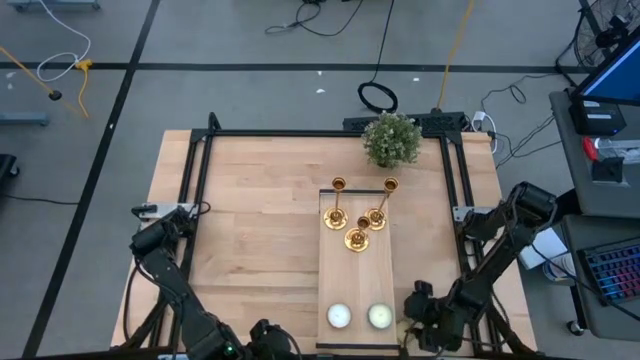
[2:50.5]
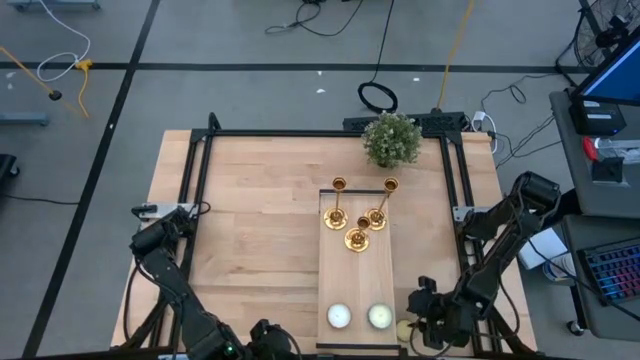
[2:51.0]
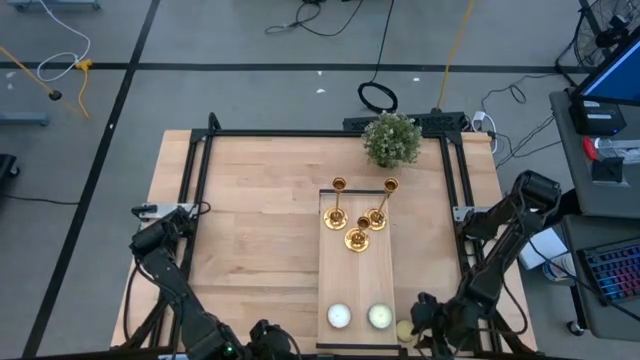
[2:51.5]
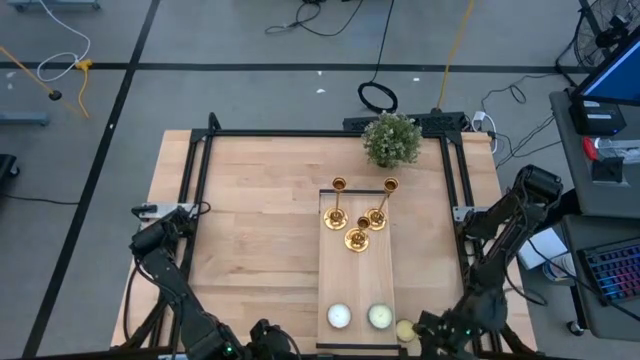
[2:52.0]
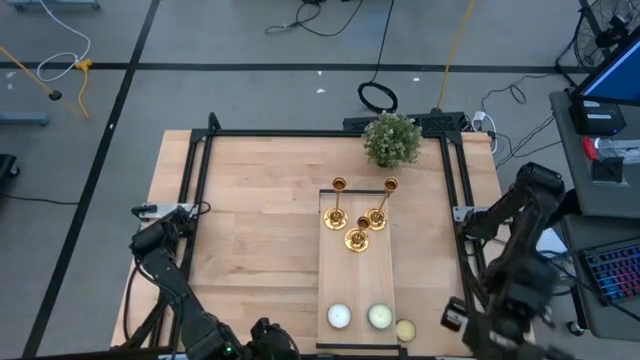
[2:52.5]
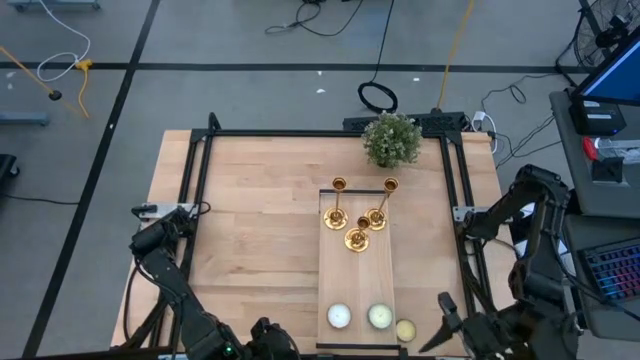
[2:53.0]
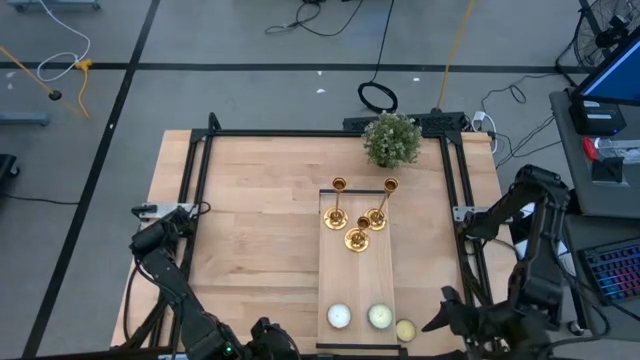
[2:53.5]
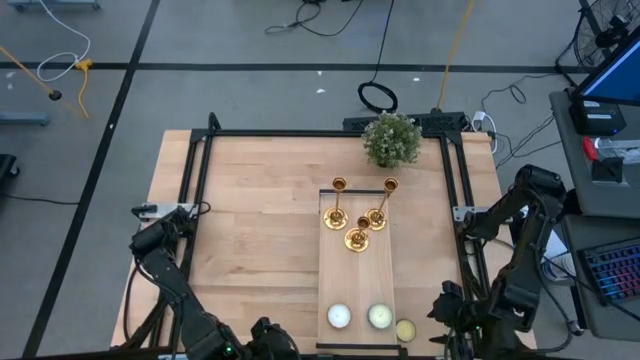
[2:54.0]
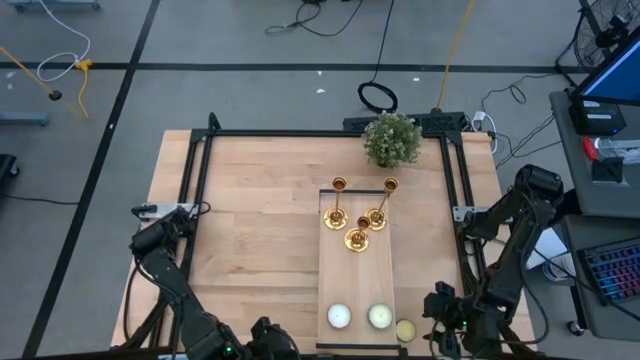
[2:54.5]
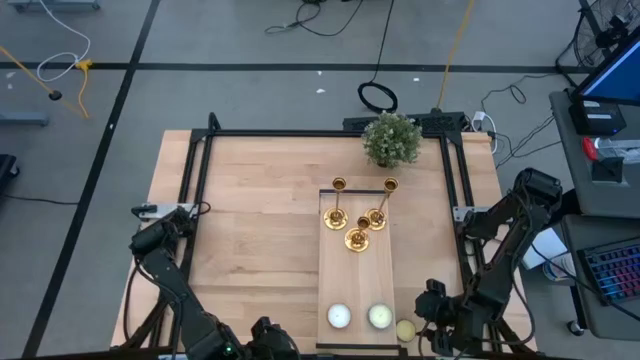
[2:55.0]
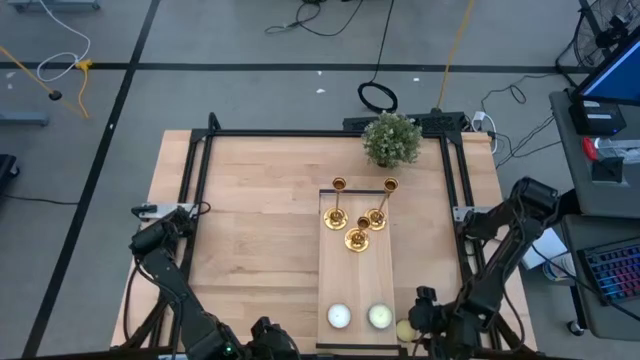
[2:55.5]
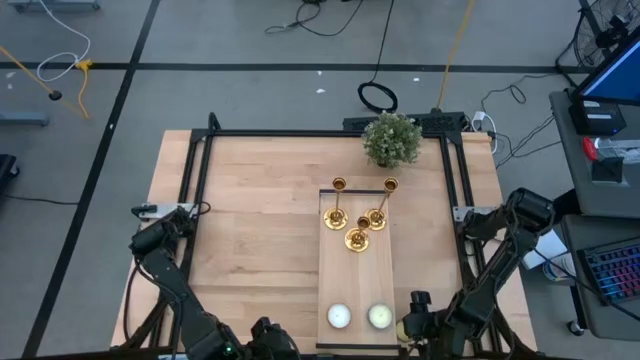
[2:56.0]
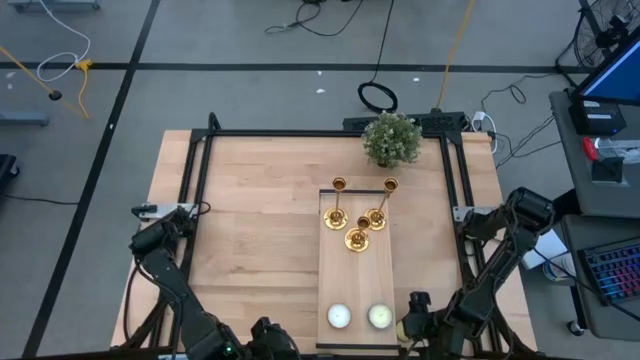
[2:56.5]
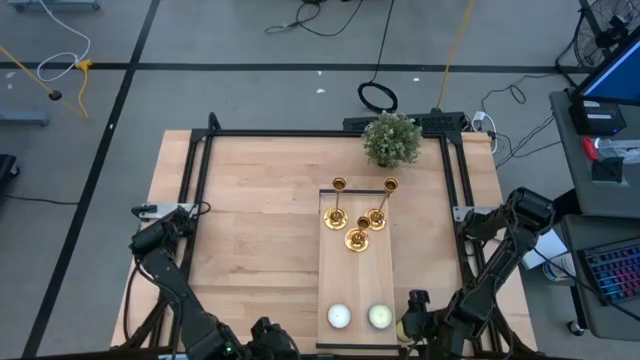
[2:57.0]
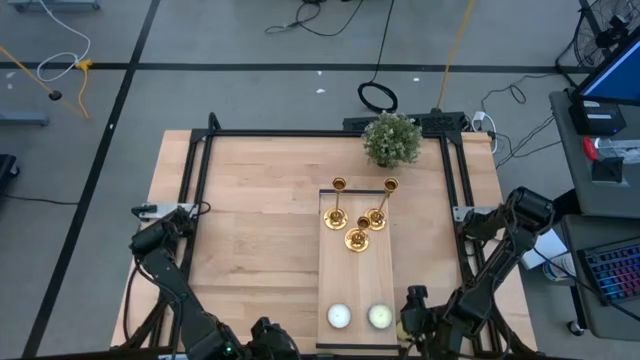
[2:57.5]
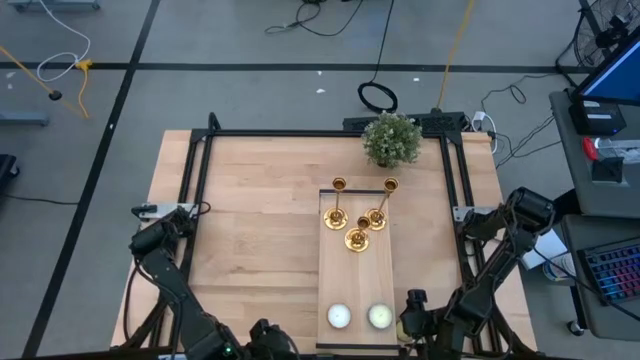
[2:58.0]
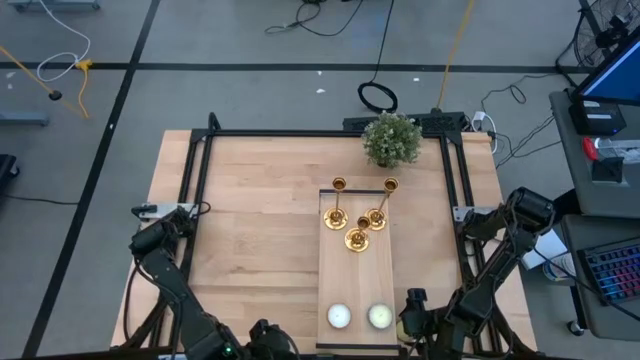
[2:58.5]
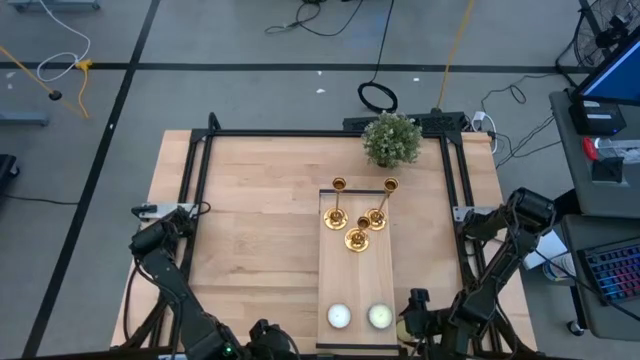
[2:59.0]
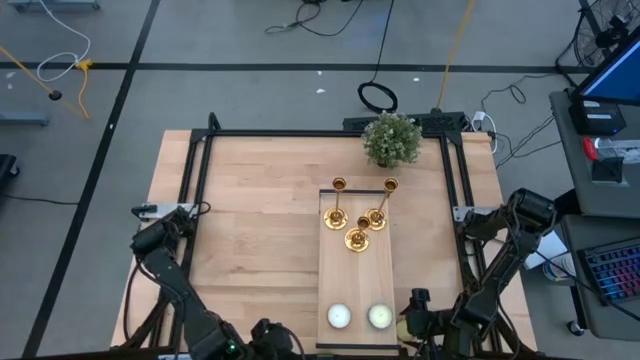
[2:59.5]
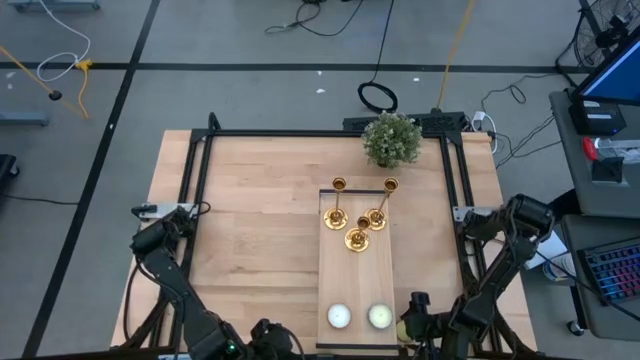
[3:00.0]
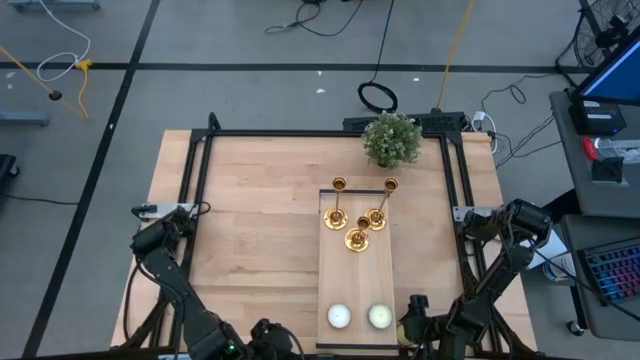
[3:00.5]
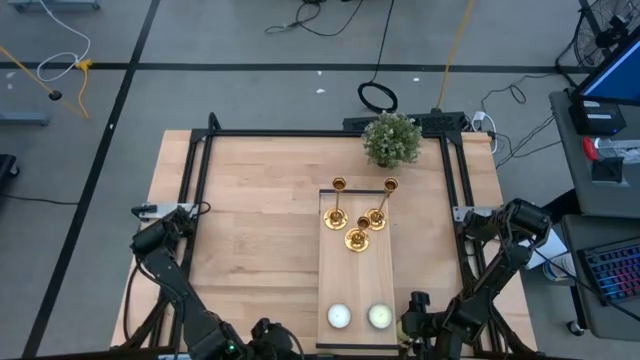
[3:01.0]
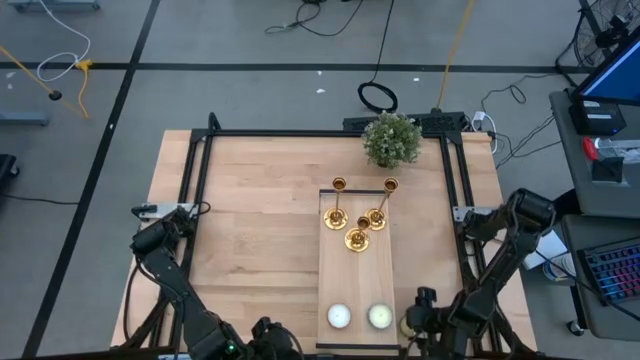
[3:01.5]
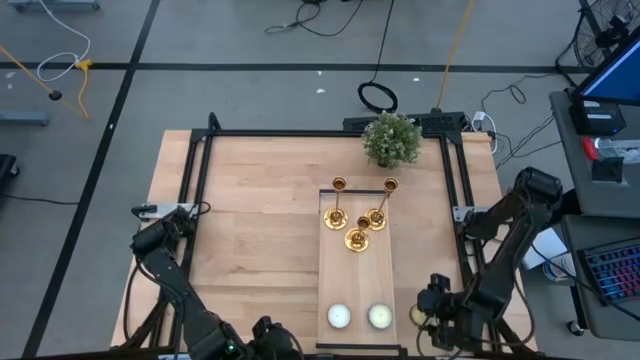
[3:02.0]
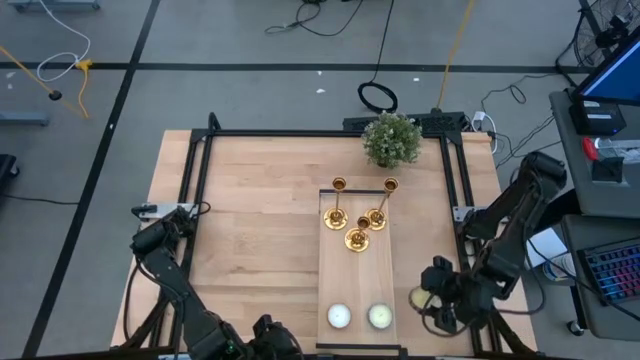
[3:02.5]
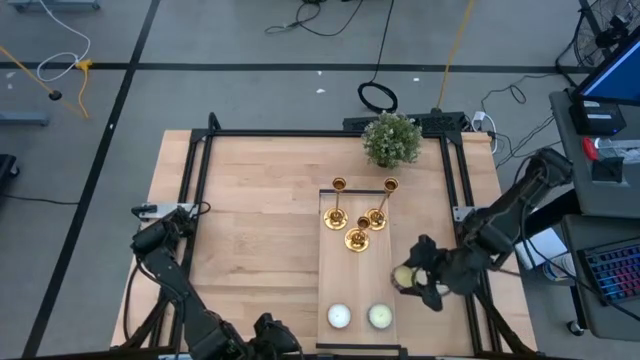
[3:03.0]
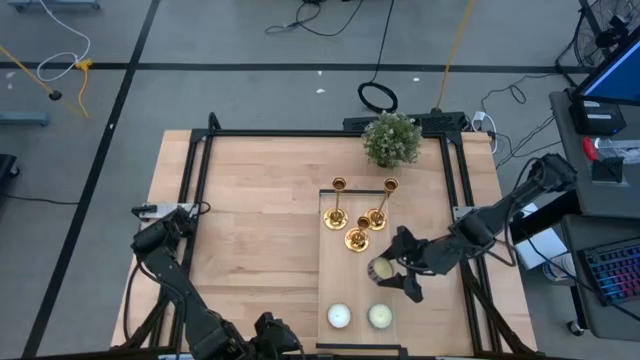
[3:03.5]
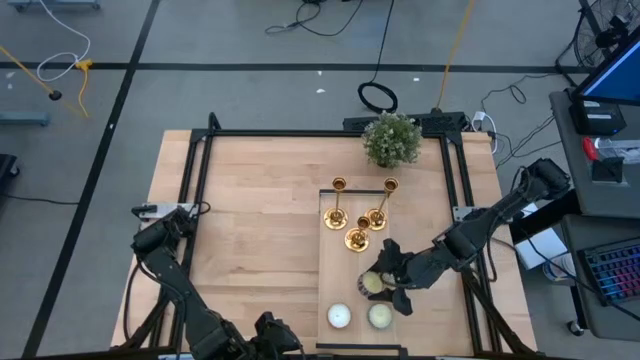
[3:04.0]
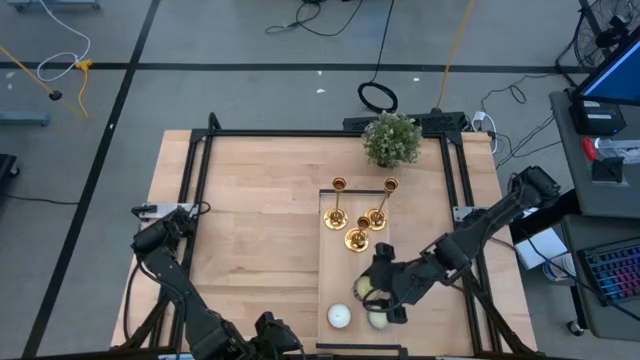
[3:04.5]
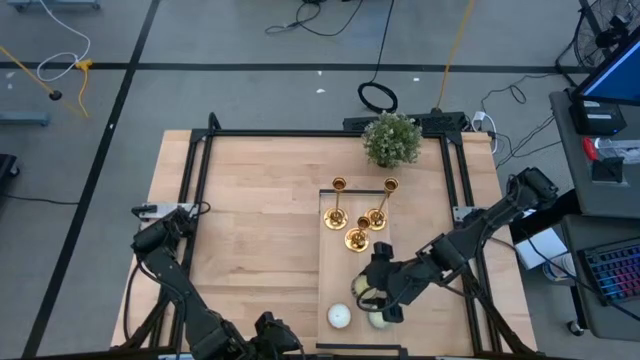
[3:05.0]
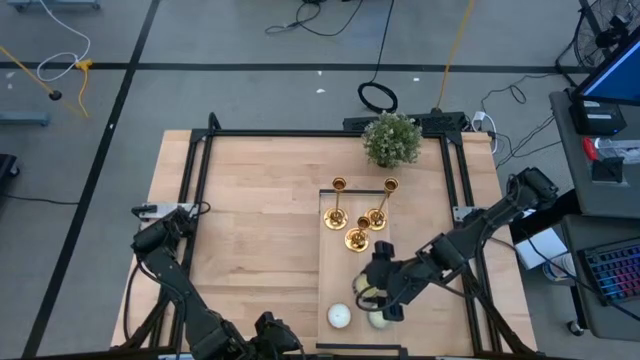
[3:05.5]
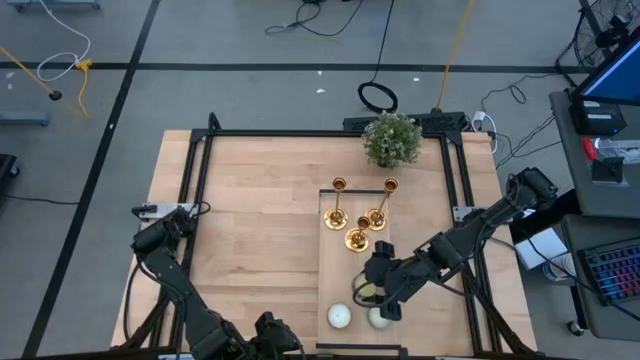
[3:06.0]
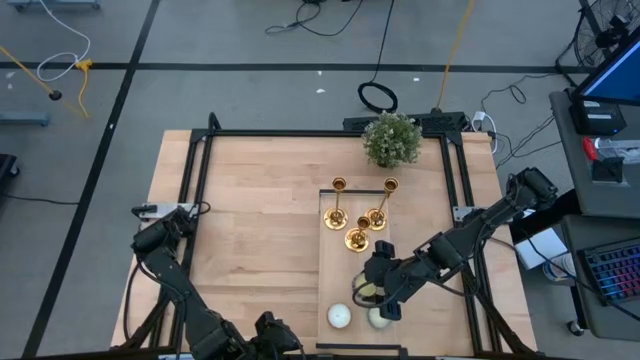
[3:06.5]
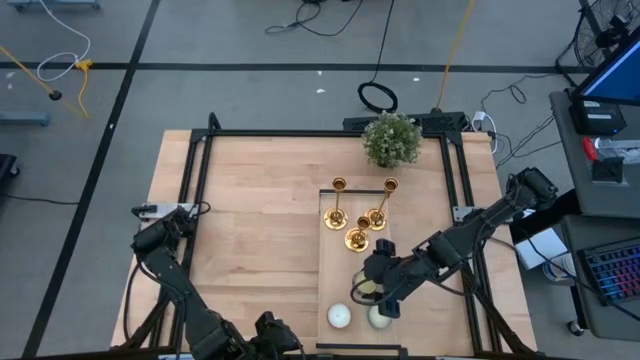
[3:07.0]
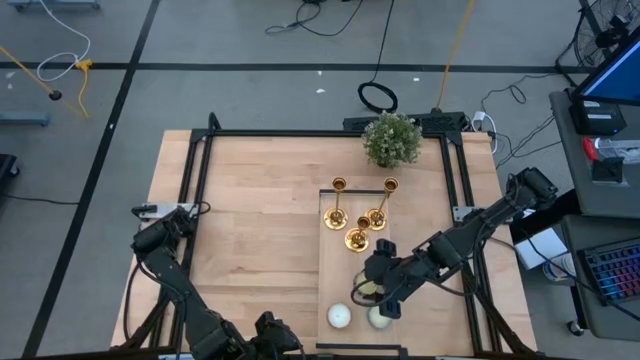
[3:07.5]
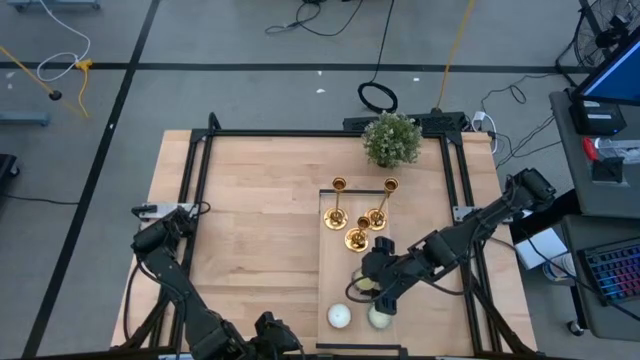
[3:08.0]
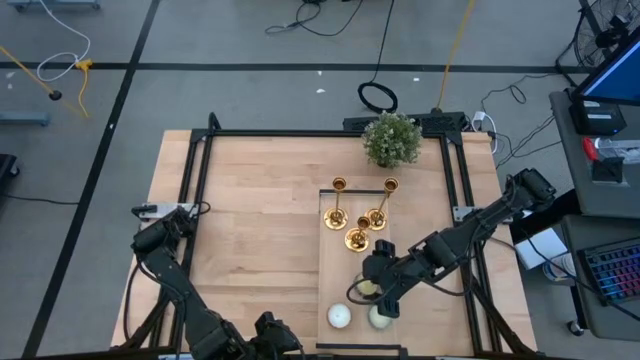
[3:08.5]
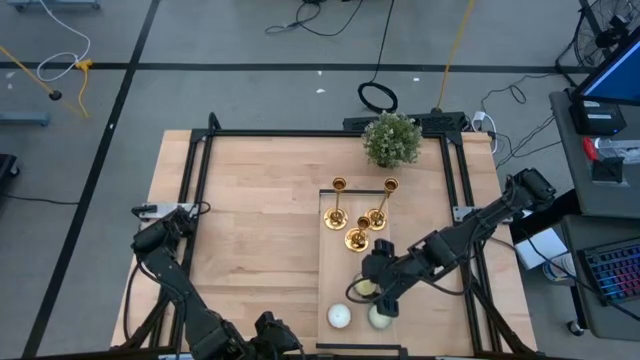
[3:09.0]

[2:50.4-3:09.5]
Task: Pick & Place candle stick holders
Put the red patterned scented candle on the shelf

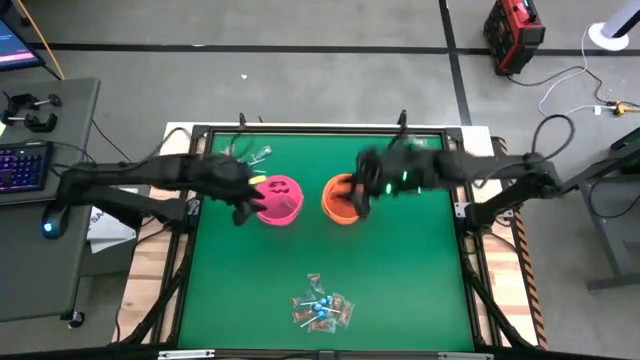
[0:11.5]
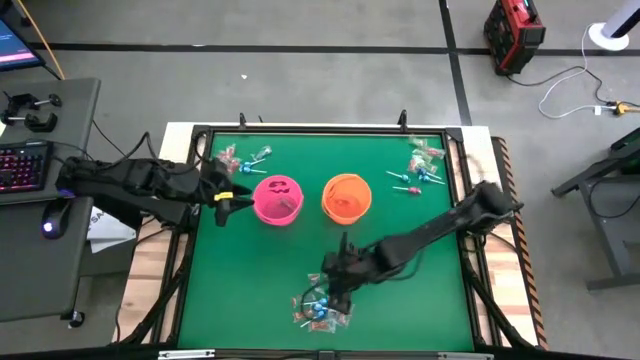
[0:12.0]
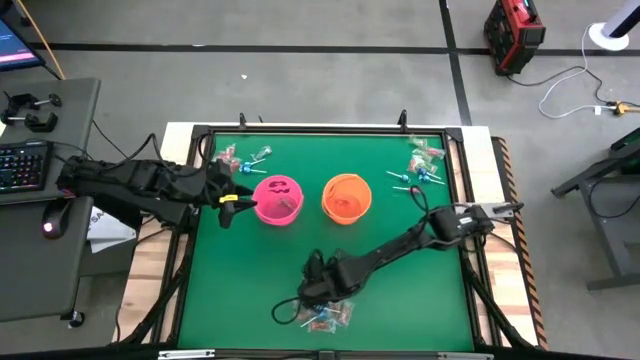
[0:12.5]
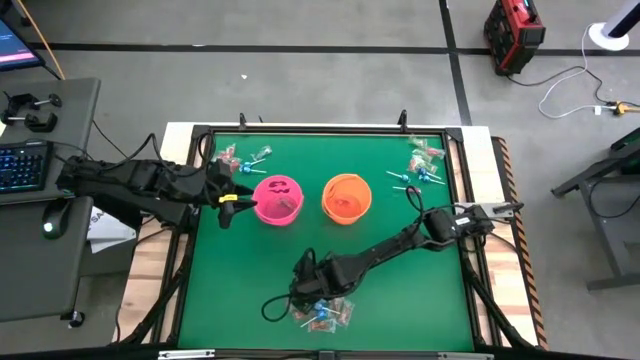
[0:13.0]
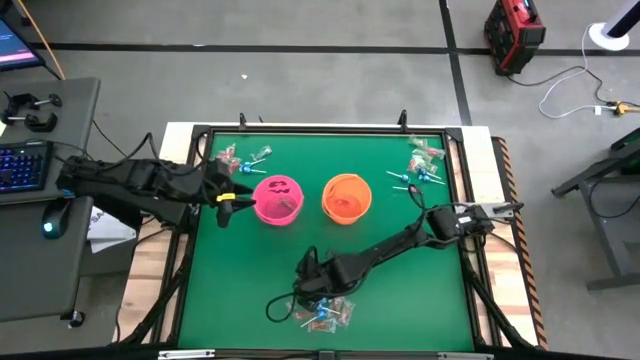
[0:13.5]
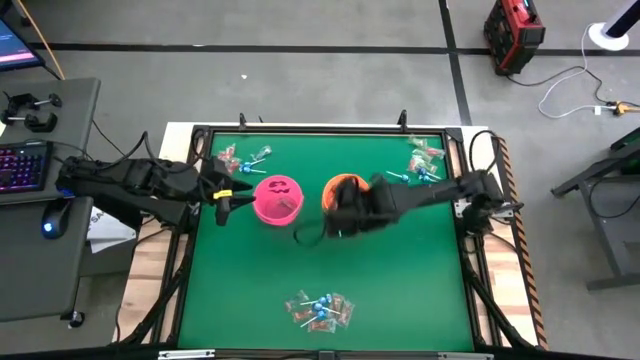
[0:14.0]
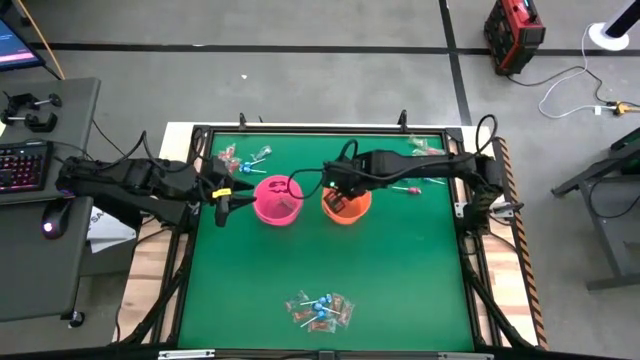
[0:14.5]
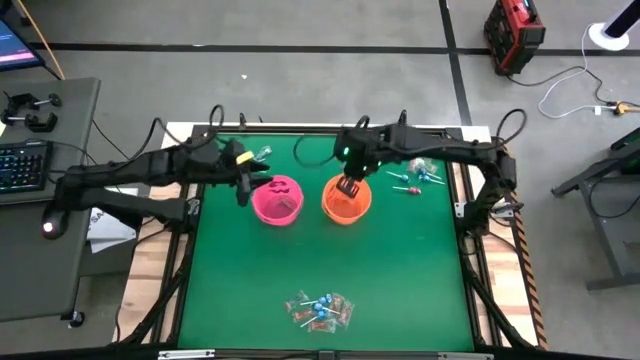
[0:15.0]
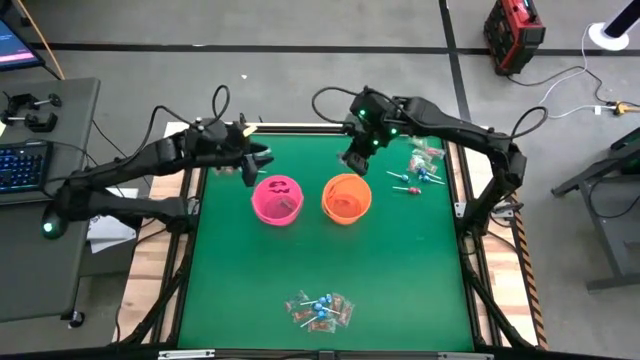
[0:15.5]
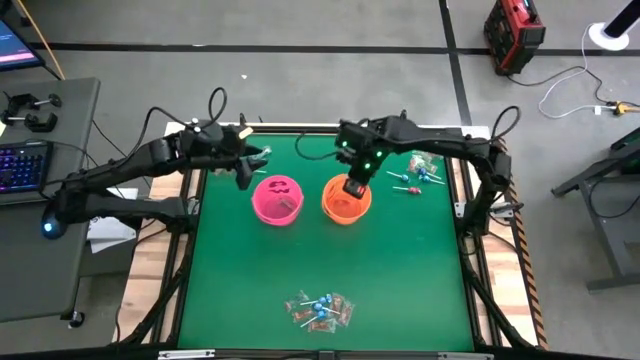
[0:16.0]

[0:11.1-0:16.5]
Task: Sort candy by brand, put in halloween buckets
Put the blue gummy into the orange bucket
